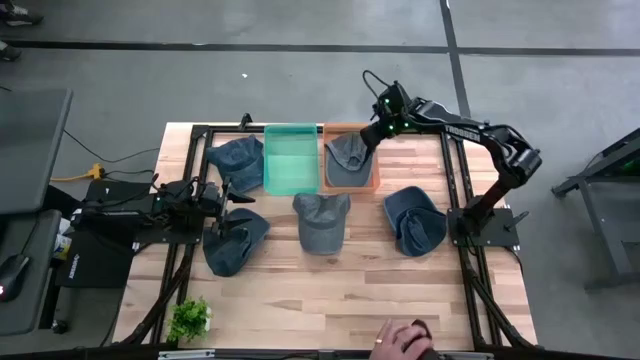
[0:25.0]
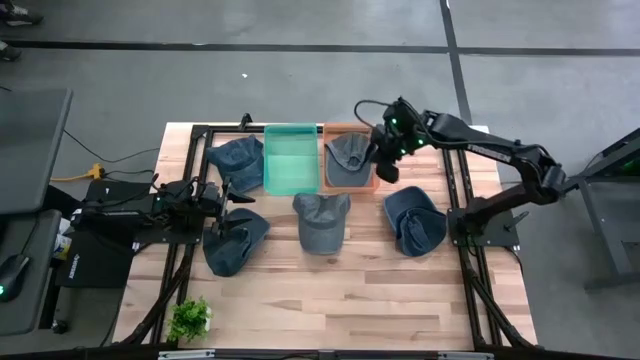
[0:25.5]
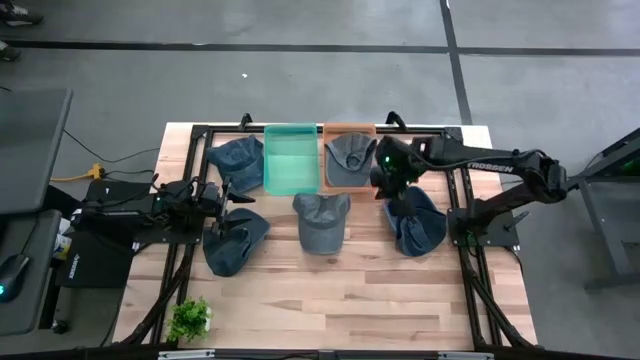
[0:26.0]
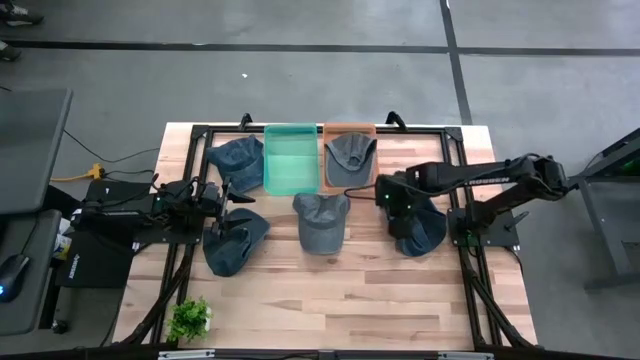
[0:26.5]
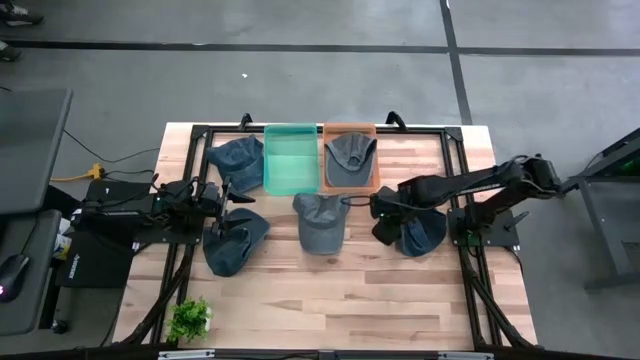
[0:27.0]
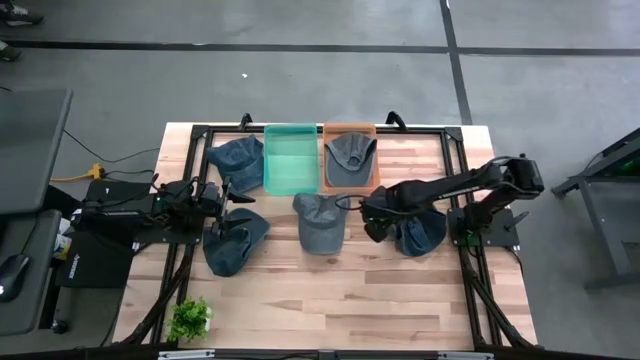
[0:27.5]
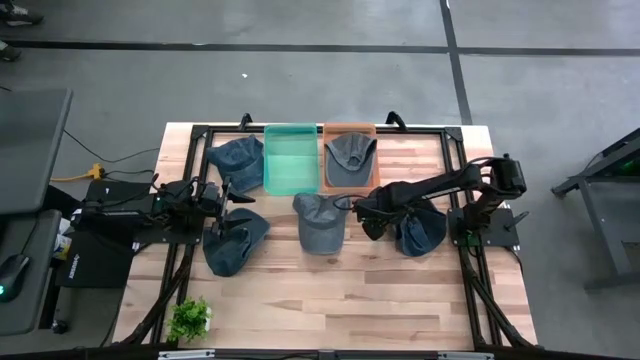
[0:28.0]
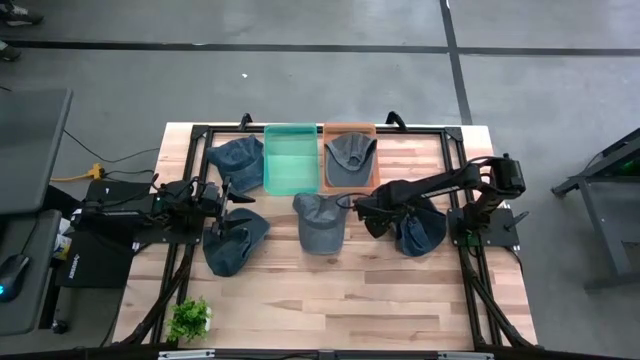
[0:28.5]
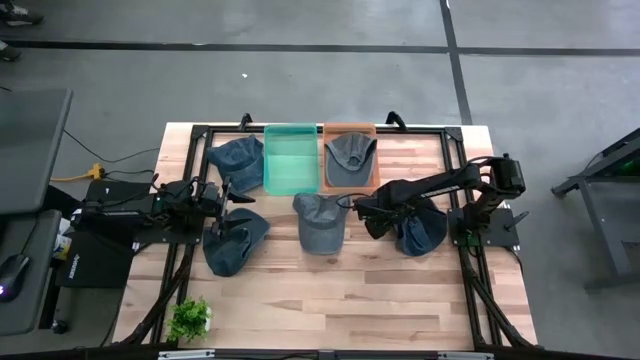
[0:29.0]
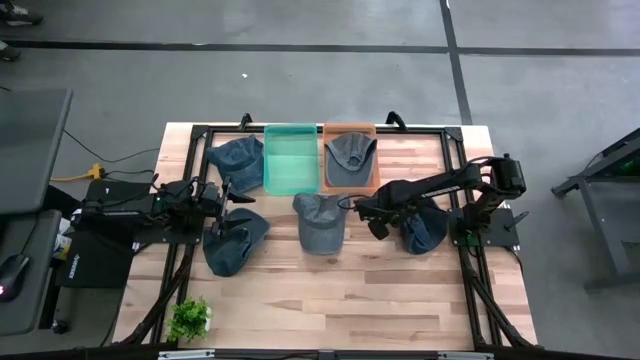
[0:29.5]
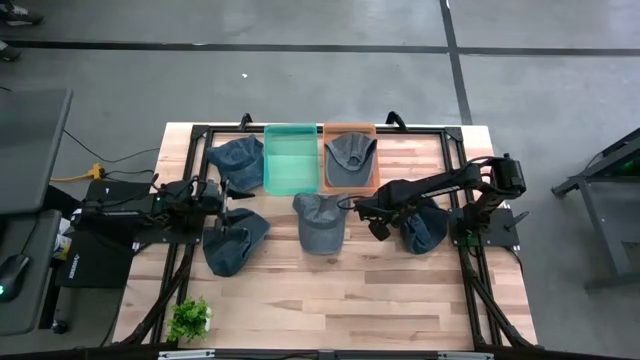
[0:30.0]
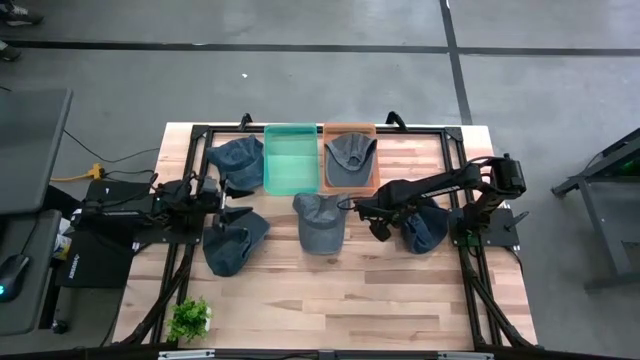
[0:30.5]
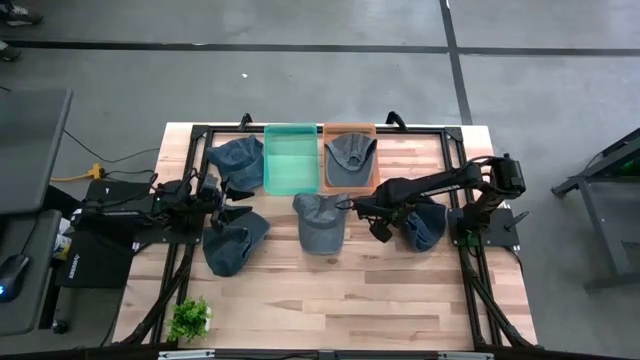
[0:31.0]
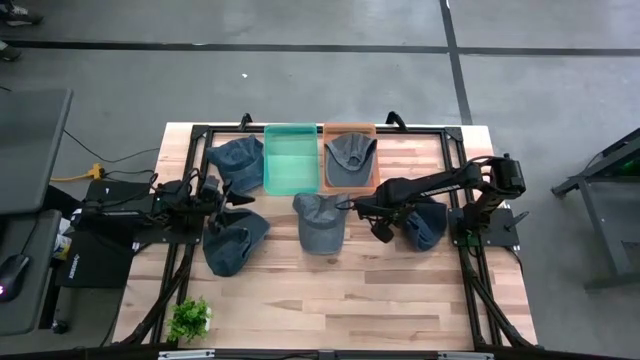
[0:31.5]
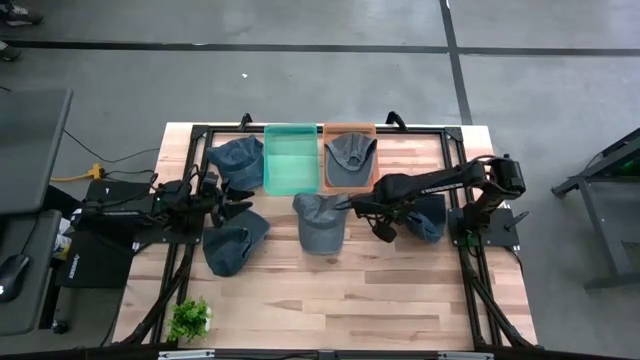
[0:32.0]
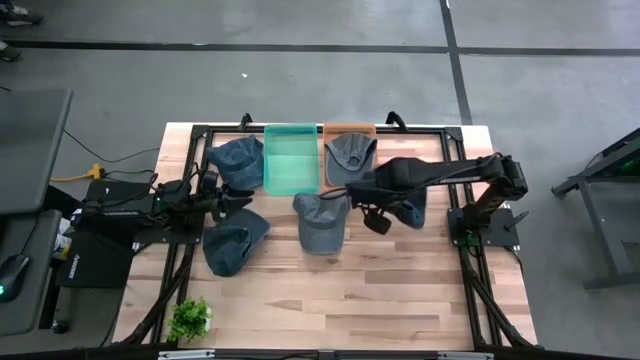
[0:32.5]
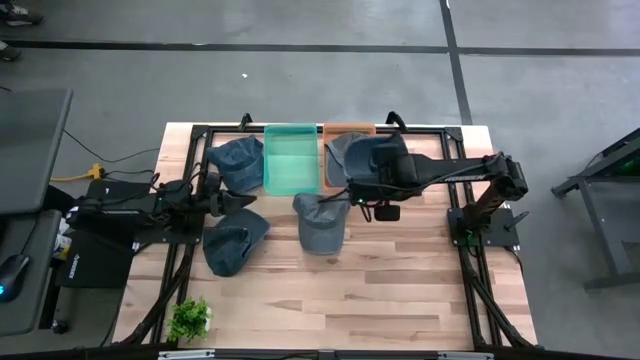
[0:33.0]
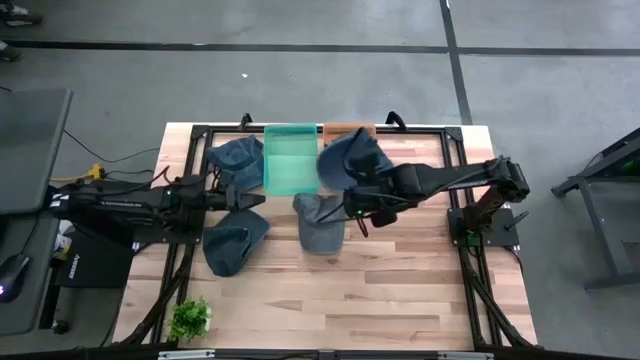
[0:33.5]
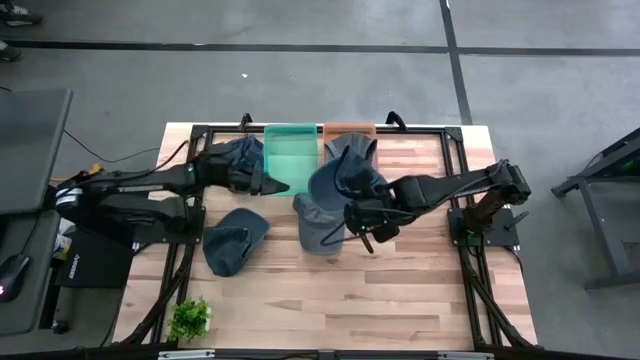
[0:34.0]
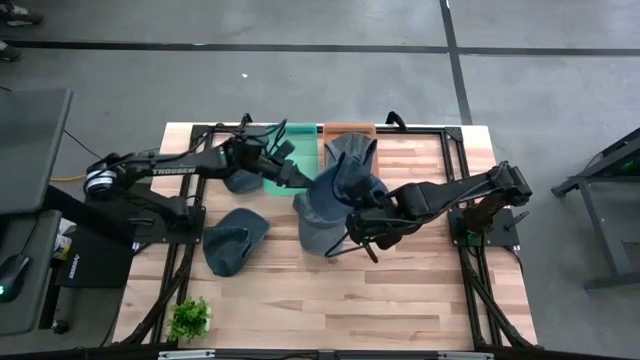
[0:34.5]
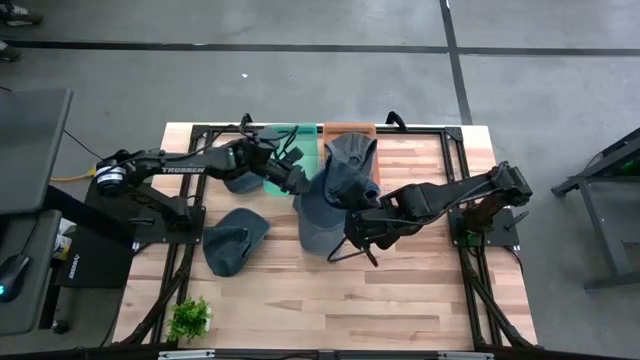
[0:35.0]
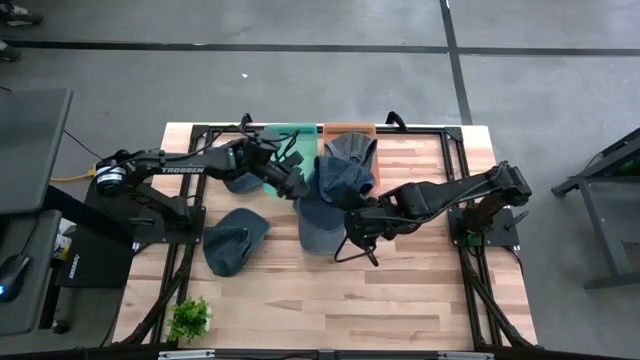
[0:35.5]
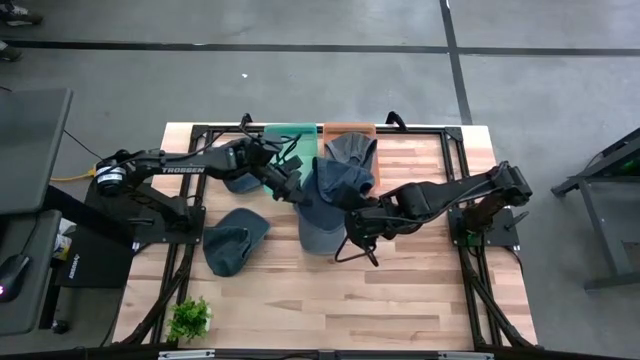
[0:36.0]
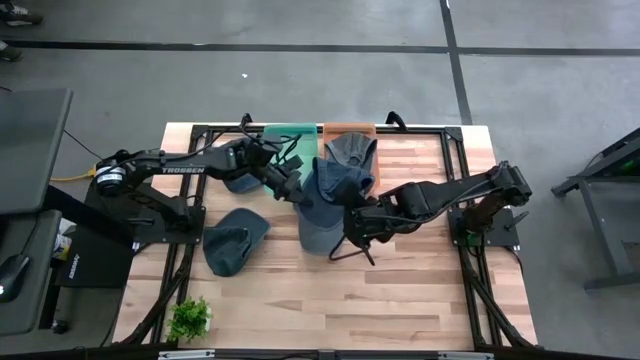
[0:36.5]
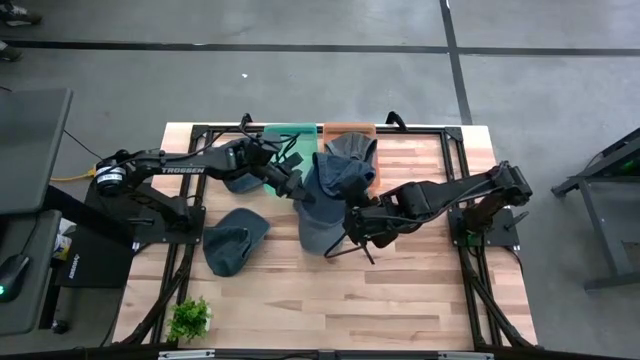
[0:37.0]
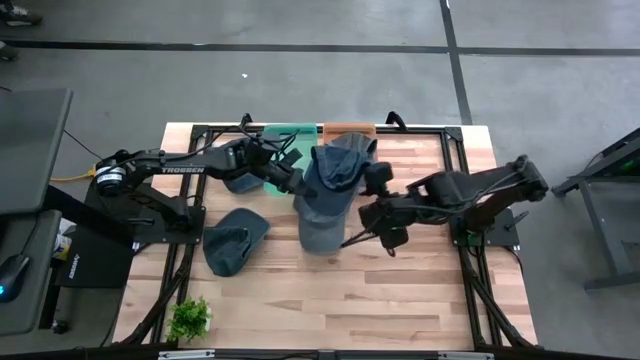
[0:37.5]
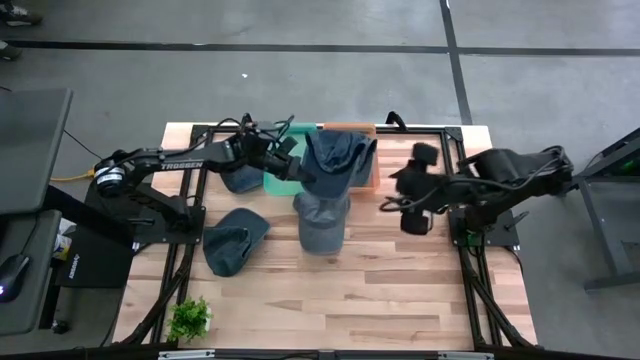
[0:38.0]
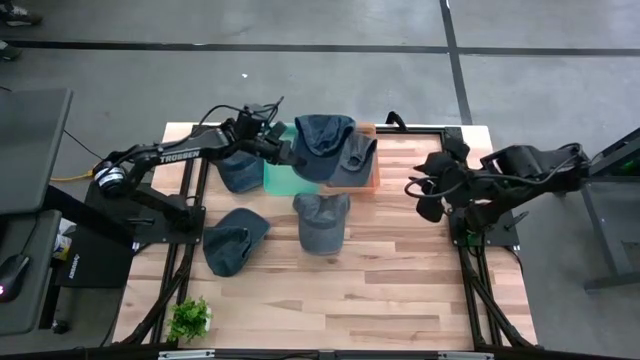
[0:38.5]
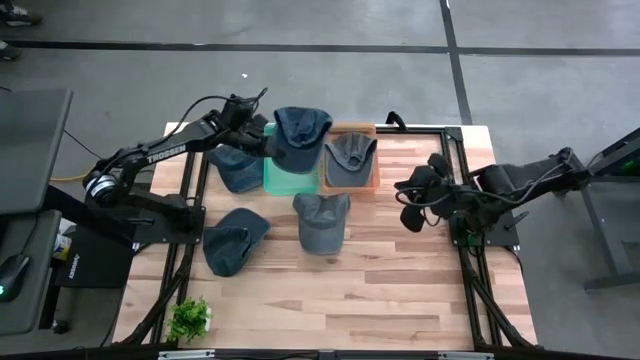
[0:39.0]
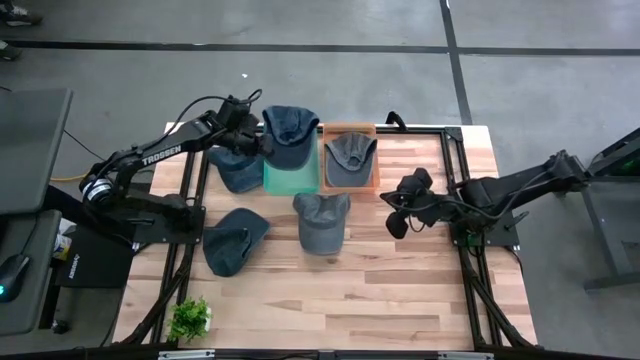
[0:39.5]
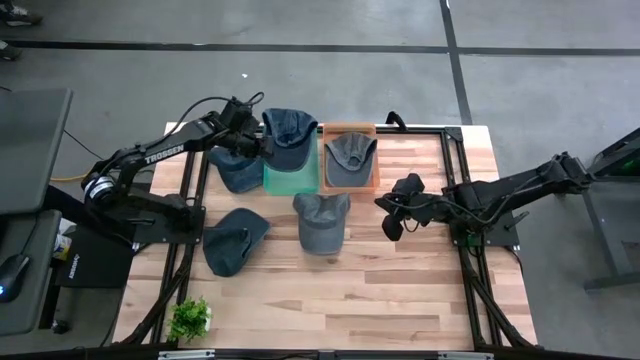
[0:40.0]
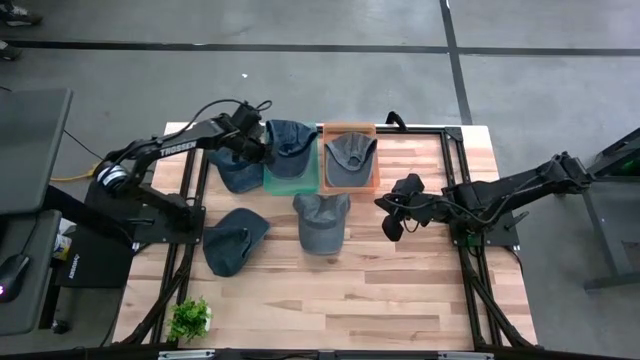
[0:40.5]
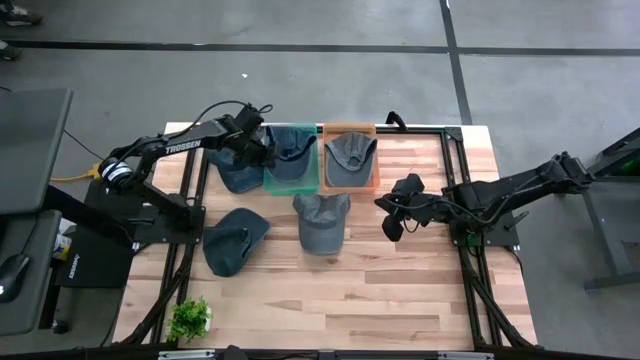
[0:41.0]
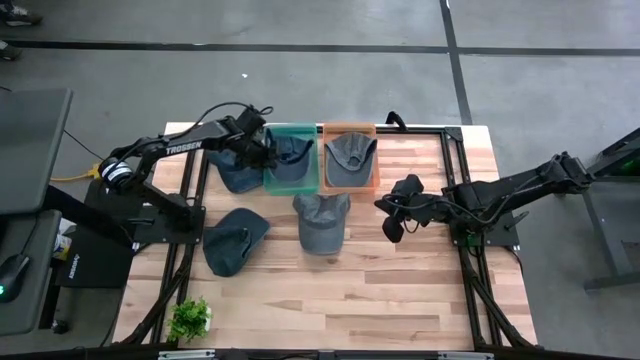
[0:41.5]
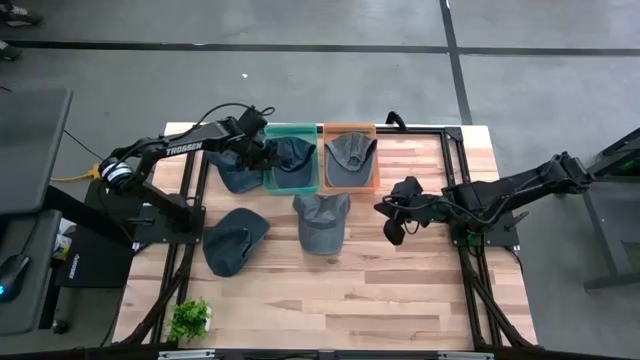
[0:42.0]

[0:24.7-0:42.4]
Task: Pick & Place hat
Put the bottom right blue cap into the green bin
